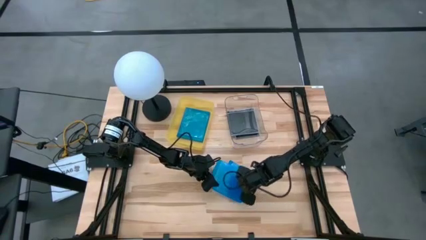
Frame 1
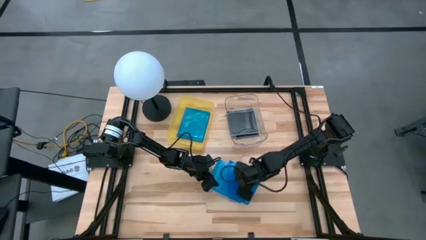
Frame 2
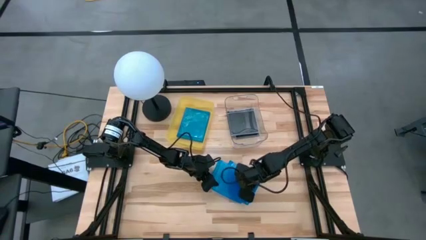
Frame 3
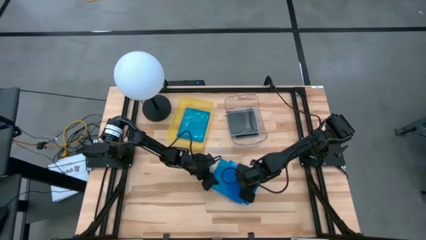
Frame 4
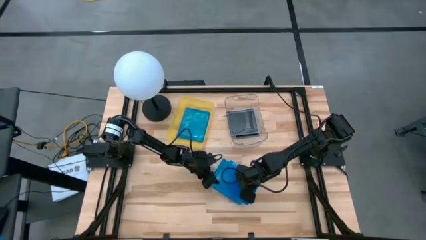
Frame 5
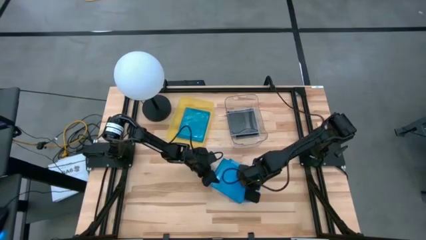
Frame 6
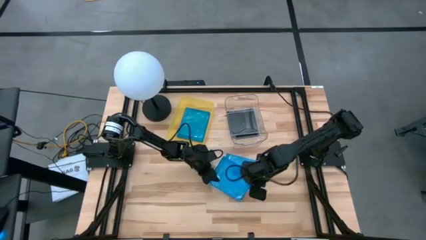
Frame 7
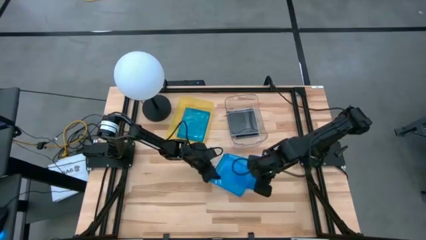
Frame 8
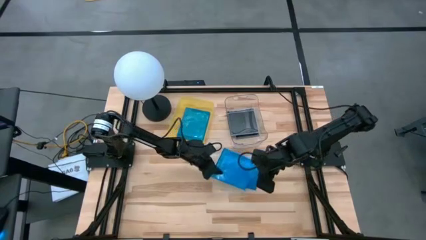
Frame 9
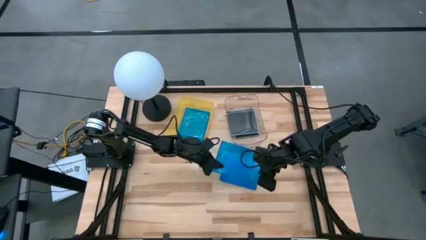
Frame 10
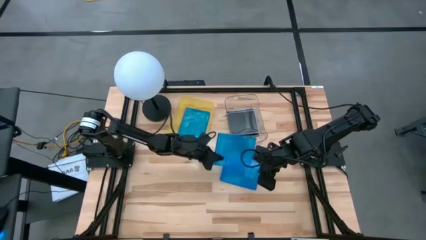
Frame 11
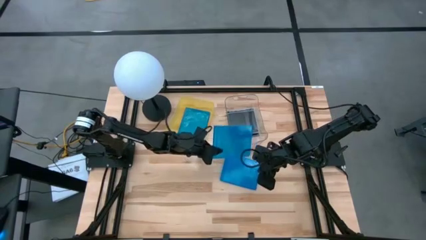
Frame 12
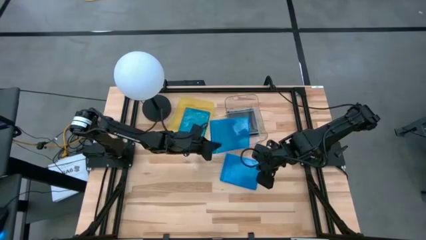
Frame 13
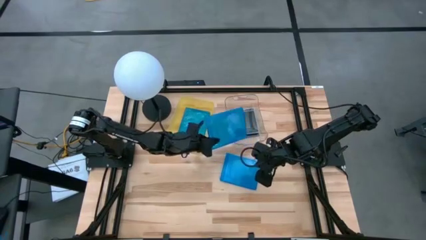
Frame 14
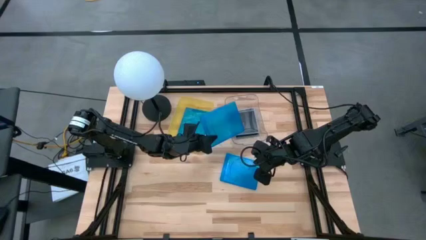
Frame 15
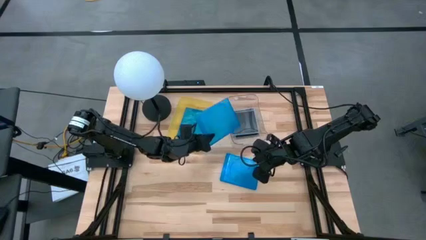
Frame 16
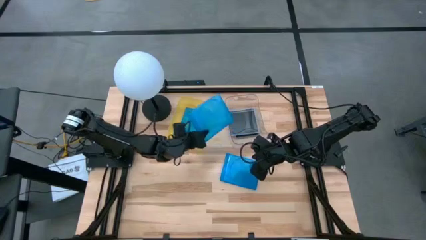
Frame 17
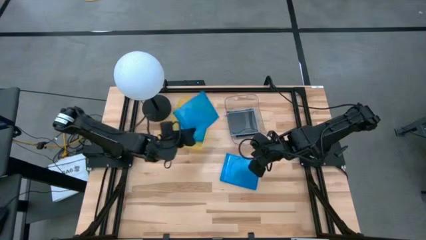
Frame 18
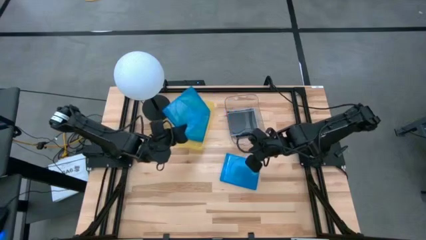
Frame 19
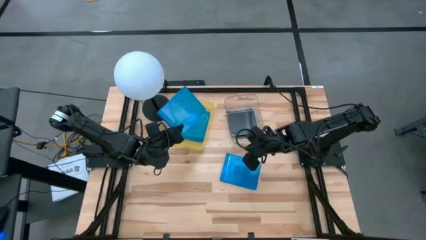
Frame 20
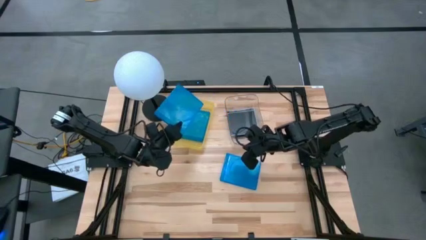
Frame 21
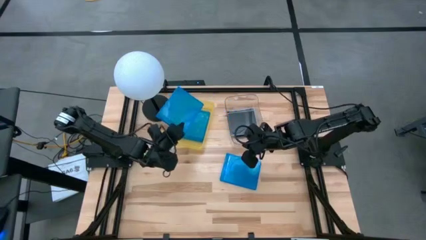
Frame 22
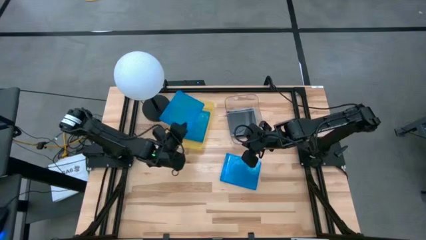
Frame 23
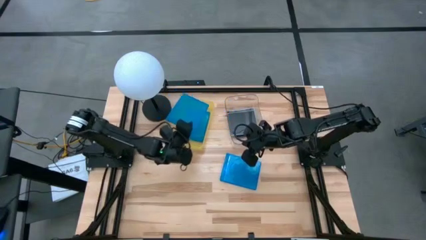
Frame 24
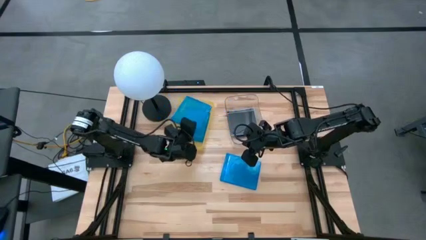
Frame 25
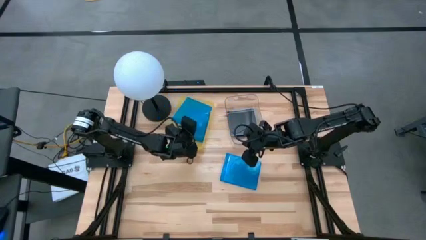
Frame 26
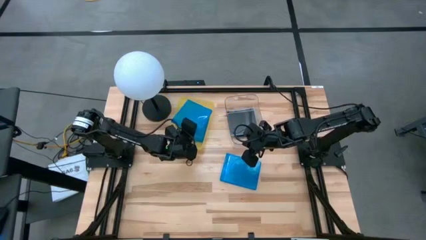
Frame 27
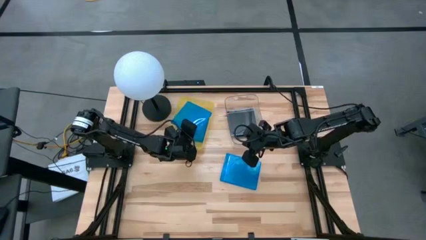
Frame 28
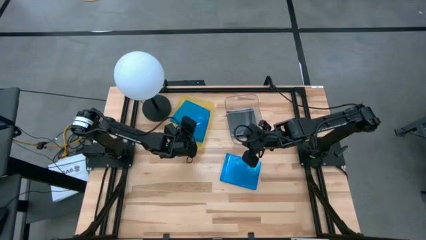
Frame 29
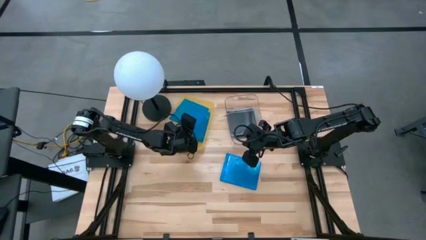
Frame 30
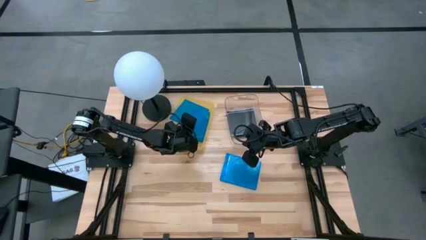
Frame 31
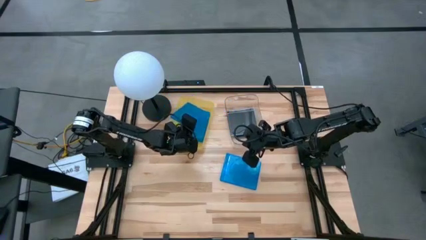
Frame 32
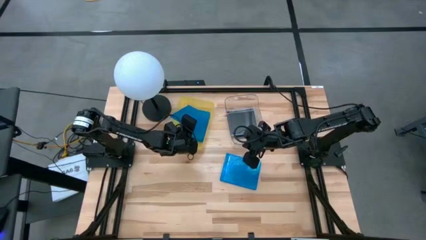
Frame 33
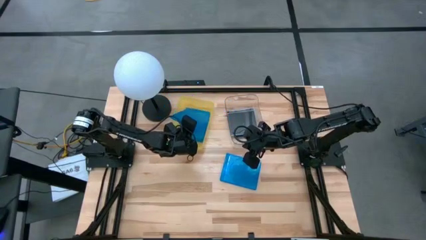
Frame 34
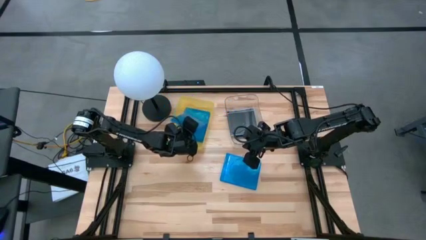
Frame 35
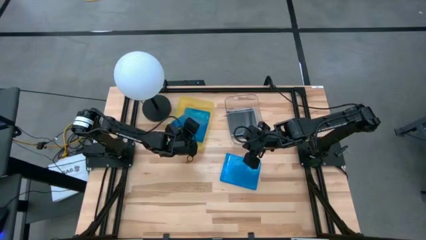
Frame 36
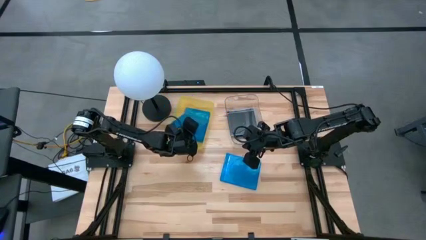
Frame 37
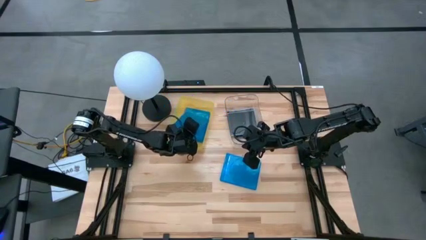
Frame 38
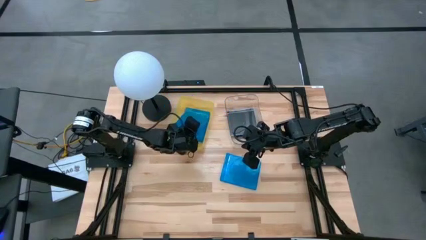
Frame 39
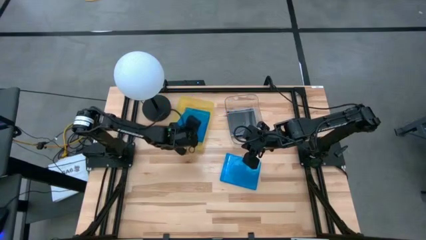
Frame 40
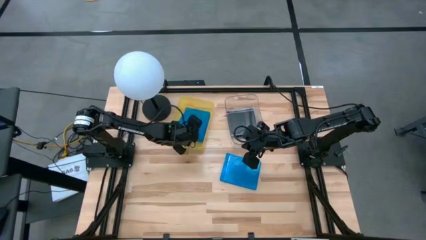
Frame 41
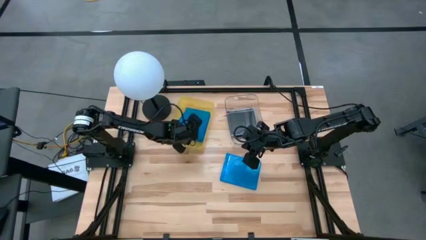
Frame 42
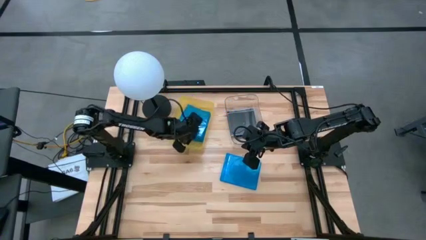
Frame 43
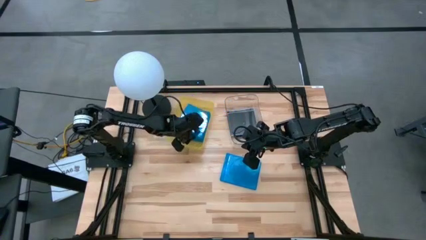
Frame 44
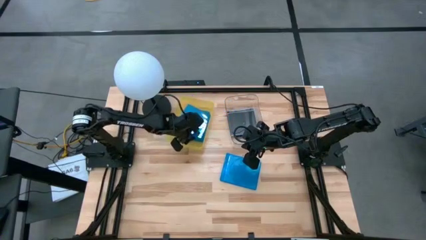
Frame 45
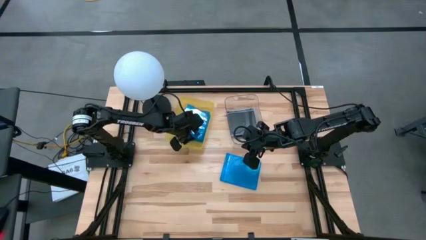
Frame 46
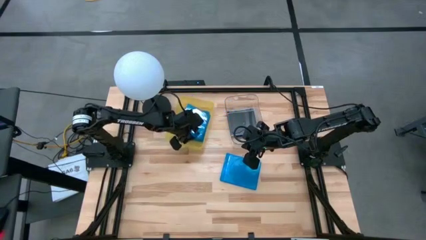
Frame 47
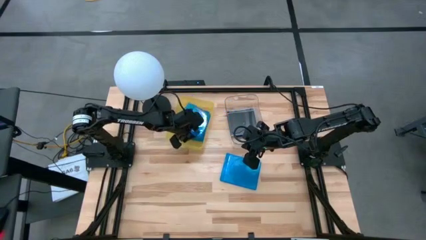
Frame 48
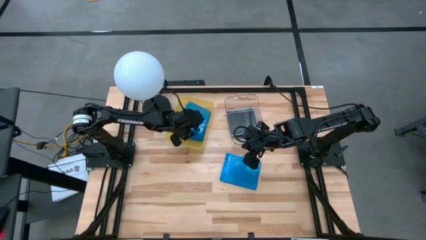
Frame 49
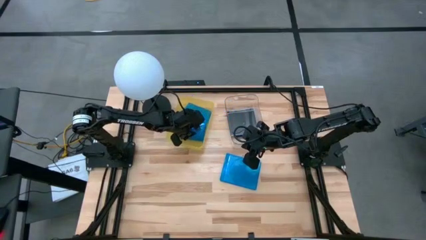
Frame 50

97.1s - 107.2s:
Task: Pick & place jewel cases by type
Put the blue CD case into the yellow bin

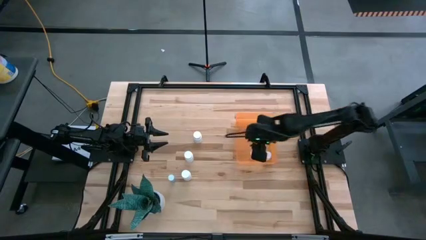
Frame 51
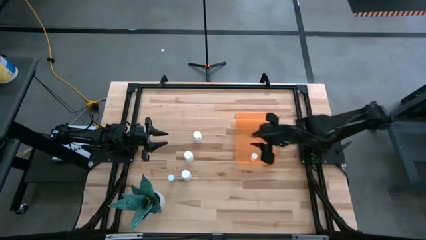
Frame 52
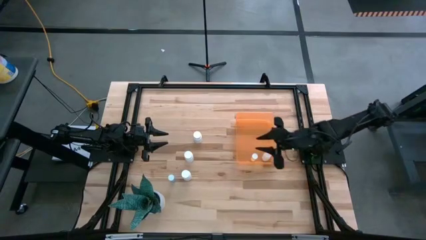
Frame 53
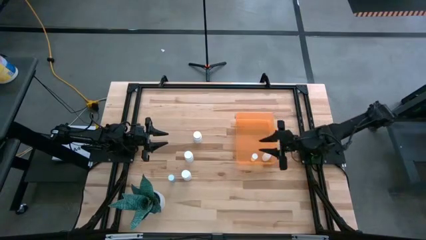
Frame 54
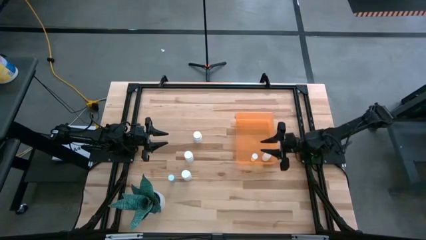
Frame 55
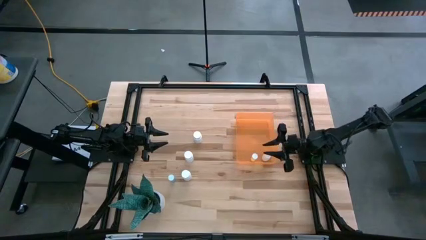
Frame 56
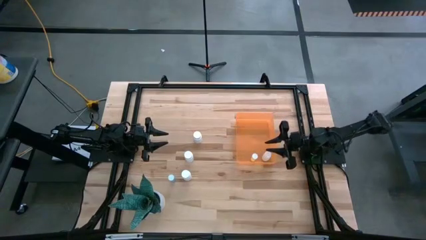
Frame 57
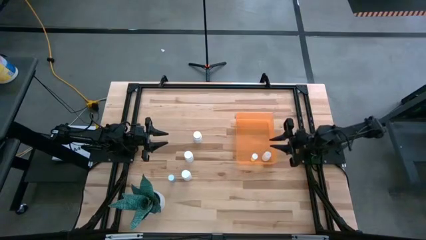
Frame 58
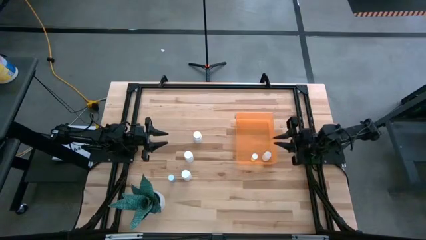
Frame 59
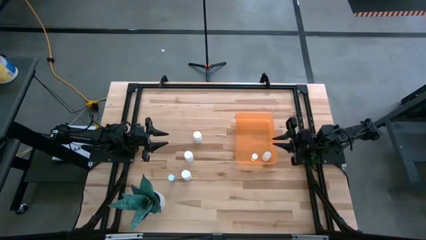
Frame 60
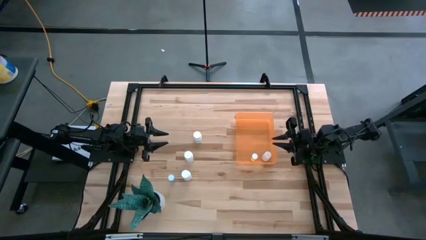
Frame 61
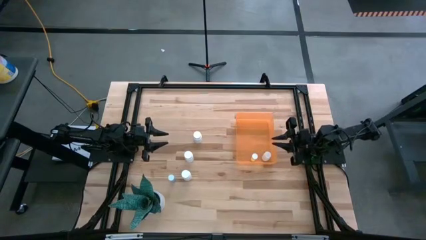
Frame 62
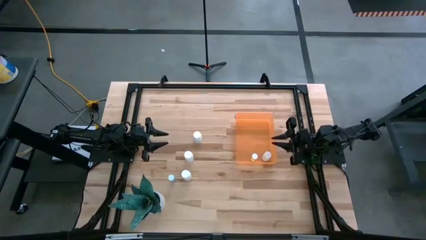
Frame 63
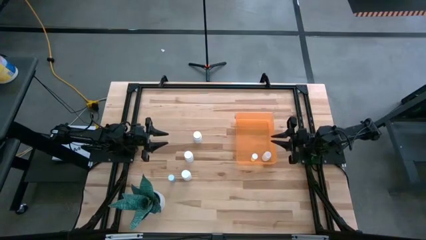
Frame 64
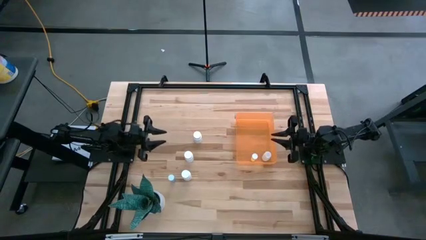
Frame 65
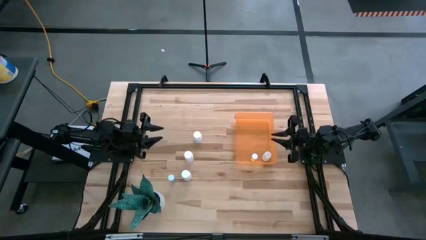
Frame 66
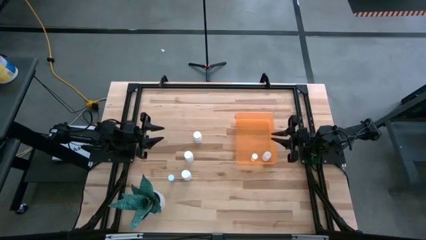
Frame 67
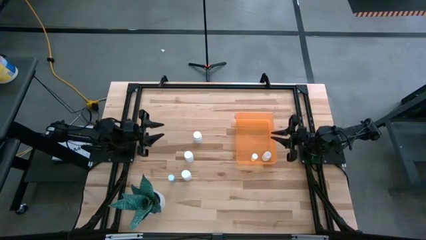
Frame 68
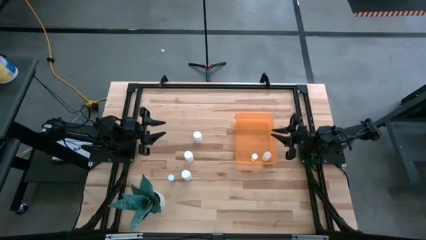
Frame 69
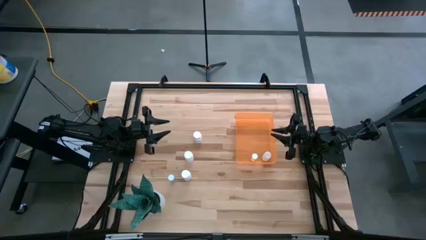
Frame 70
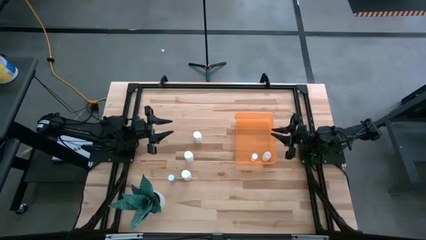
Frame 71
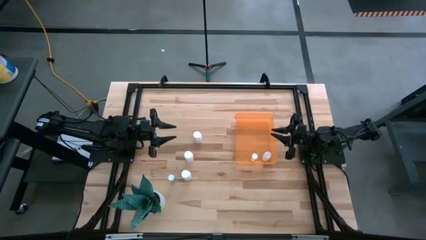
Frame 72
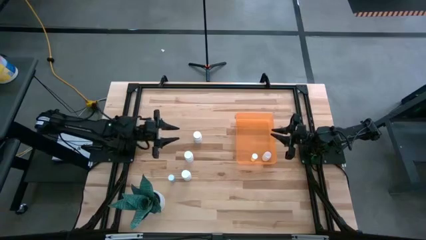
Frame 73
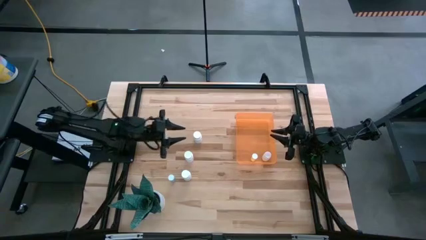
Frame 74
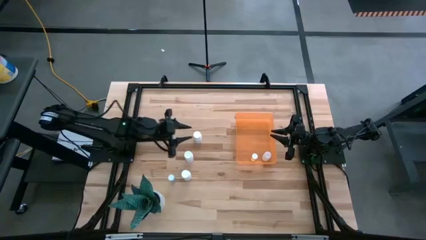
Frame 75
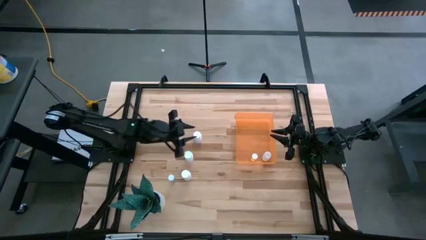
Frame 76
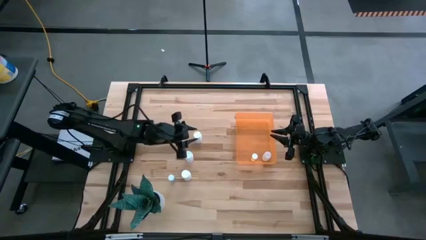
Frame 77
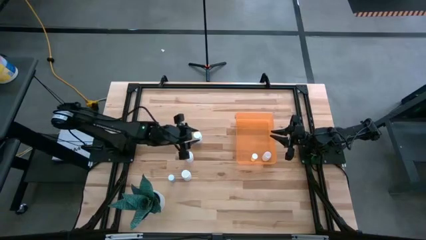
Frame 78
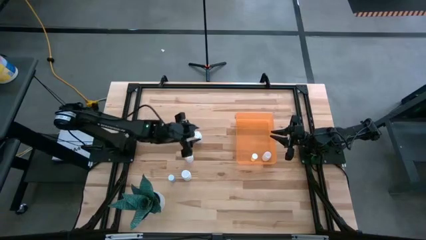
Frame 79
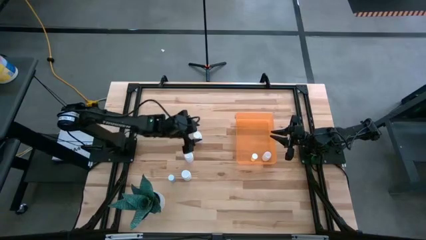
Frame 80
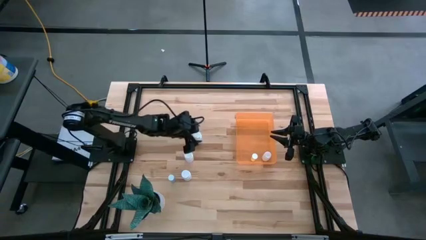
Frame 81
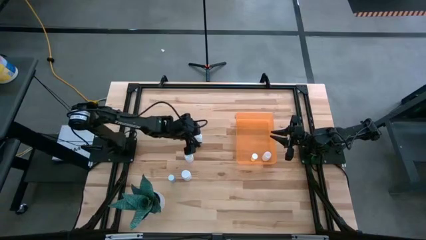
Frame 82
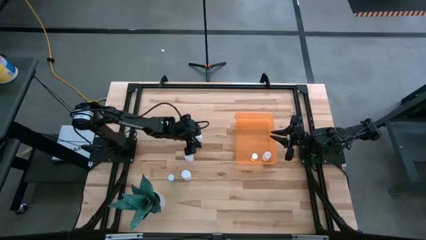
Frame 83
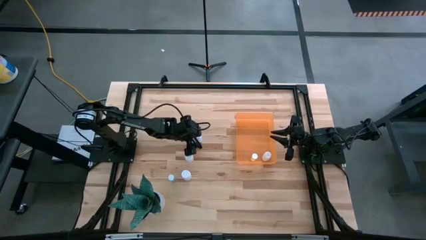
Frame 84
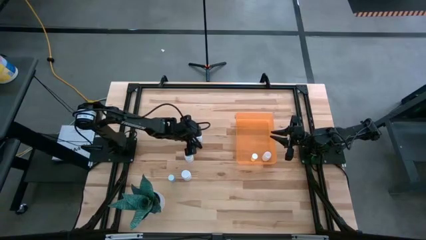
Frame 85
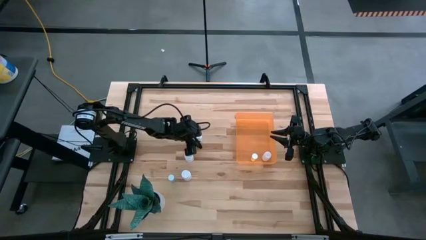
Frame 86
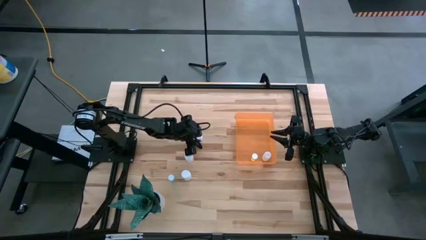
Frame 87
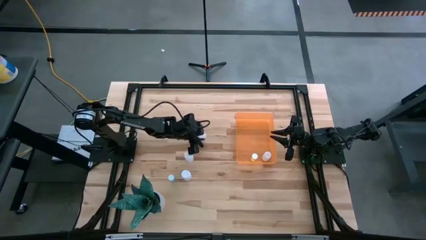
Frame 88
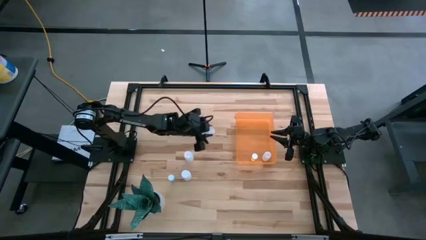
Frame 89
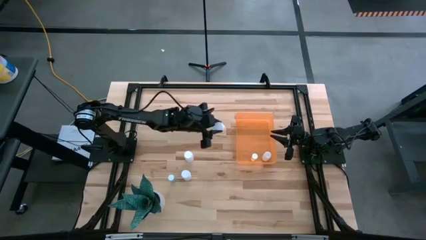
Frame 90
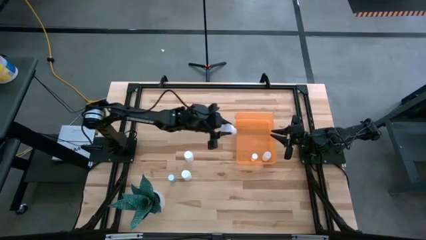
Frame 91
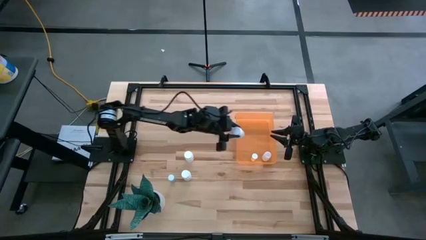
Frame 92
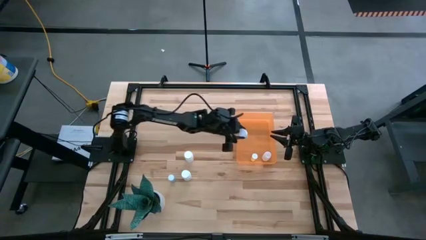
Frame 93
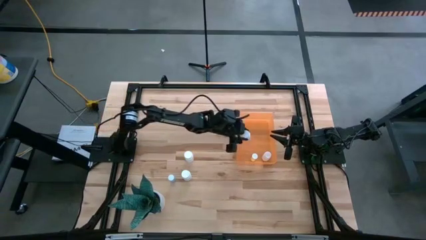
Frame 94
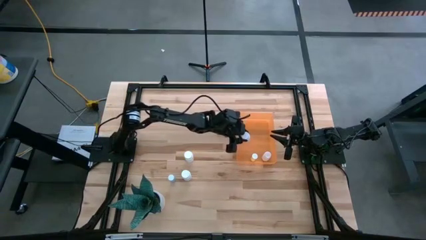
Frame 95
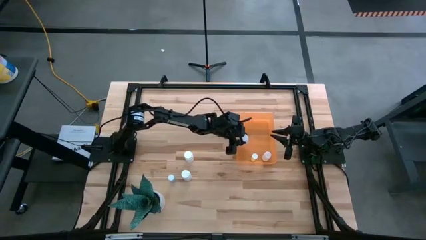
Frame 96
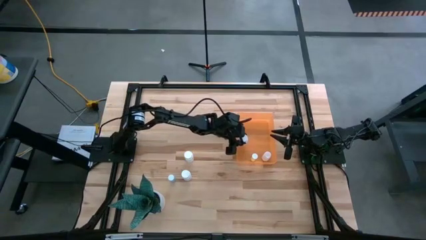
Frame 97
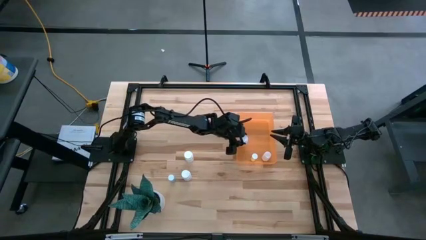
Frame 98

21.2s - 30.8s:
Task: Pick and place pill bottles into a basket
Put the top white medicine bottle into the orange container
